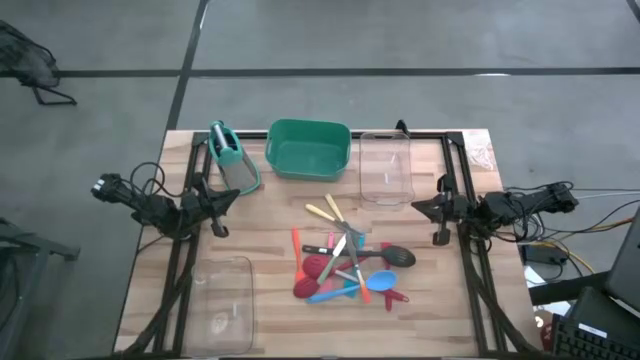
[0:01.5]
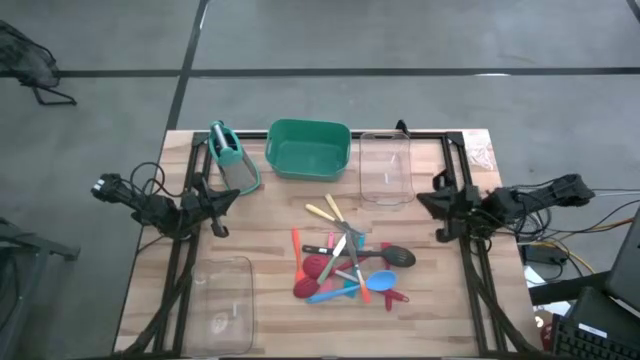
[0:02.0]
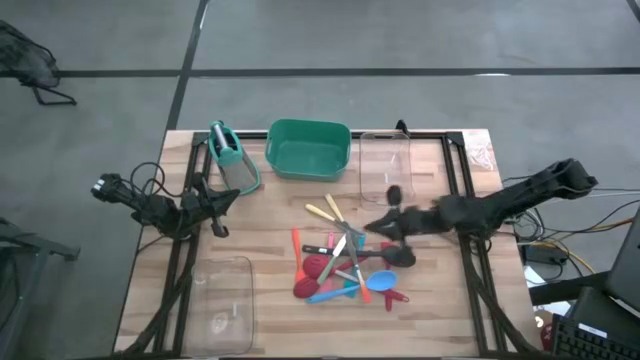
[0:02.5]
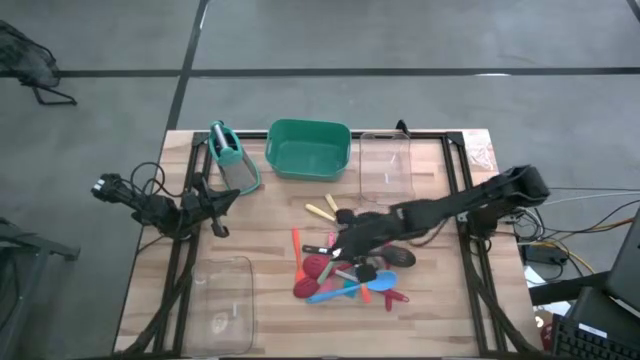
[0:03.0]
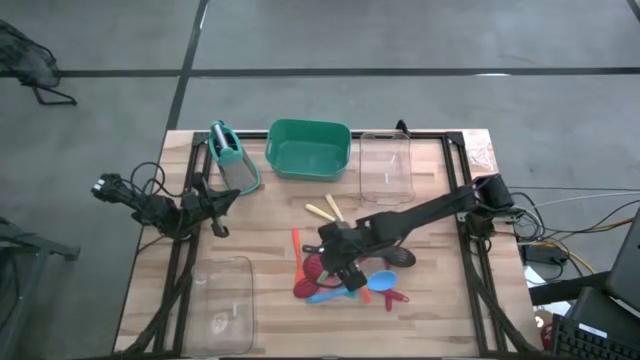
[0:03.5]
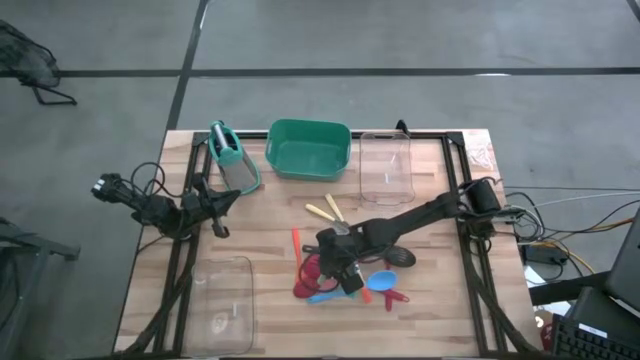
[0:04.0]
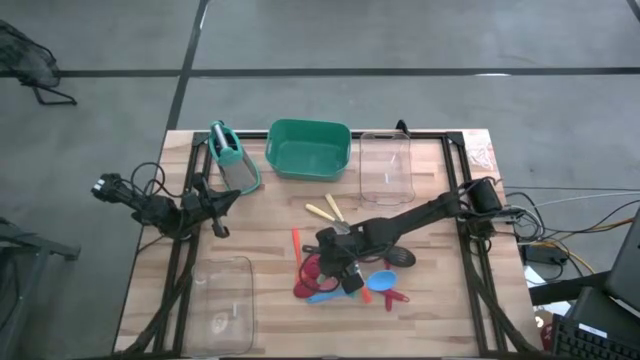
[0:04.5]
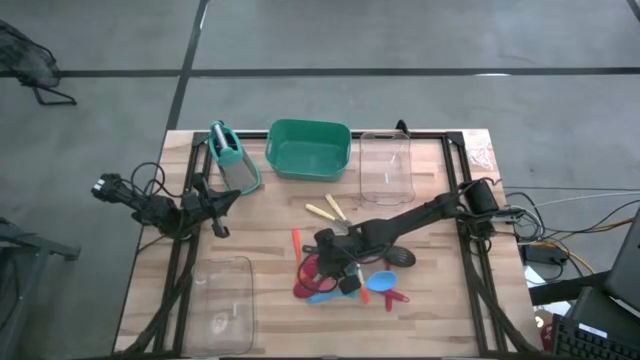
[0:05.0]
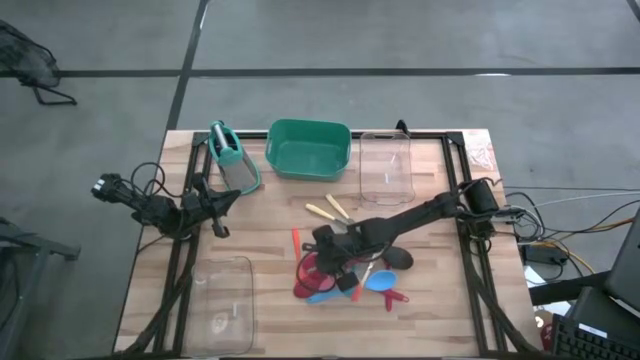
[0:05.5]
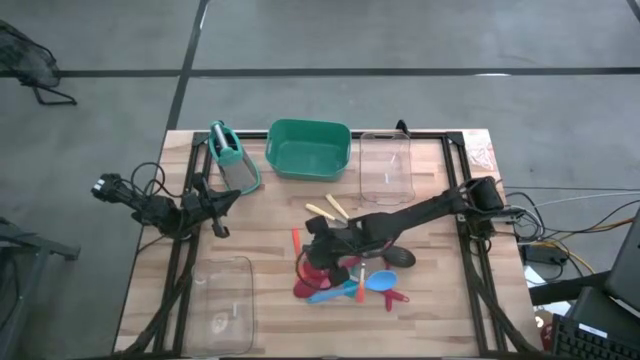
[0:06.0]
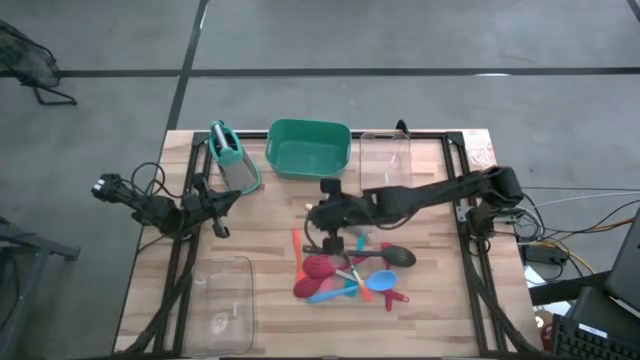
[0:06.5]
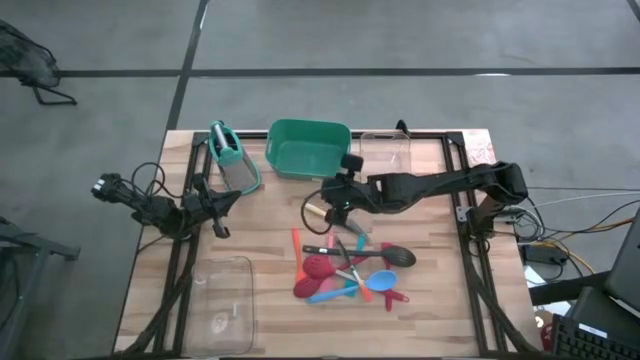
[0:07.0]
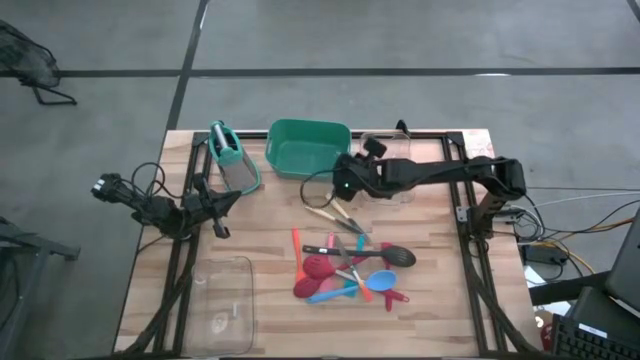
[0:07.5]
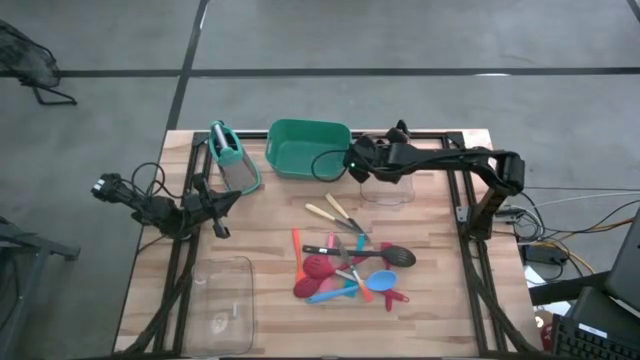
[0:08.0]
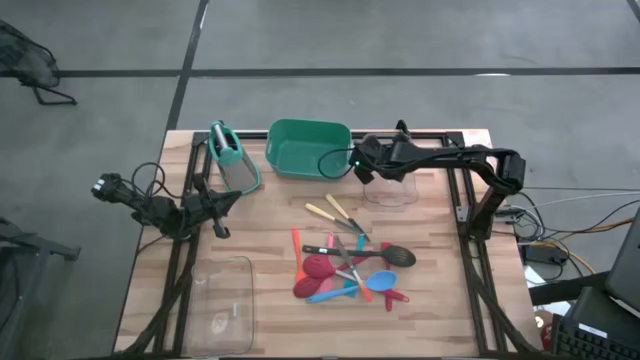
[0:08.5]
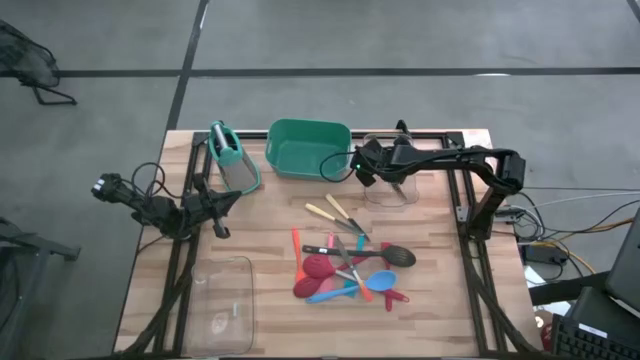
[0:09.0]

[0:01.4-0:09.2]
Task: Pick & Place Kitchen Items
Put the green knife into the top transparent bin

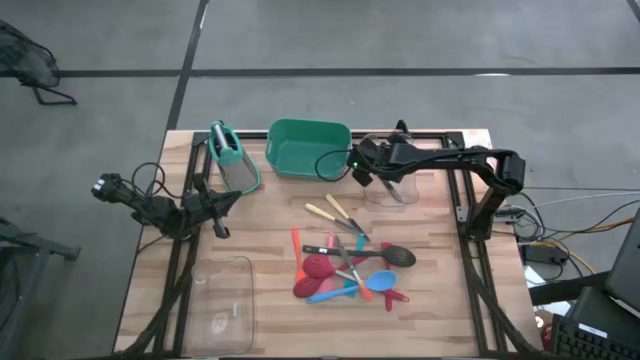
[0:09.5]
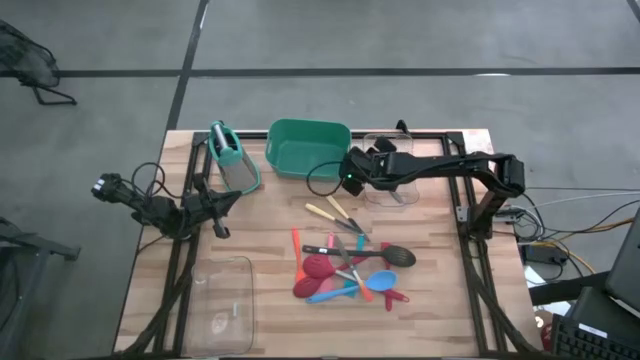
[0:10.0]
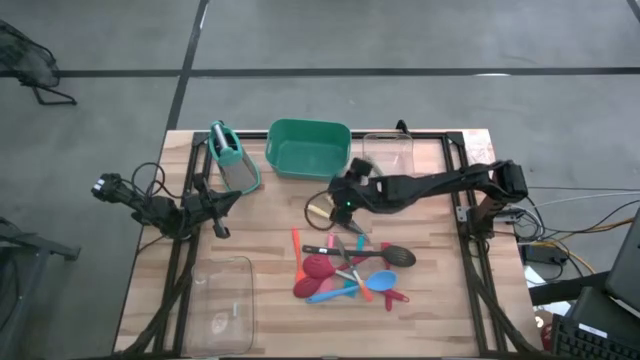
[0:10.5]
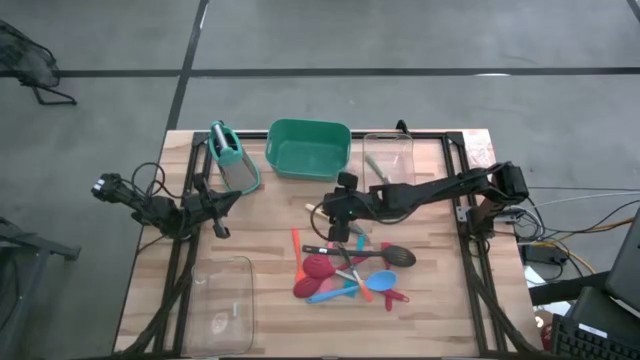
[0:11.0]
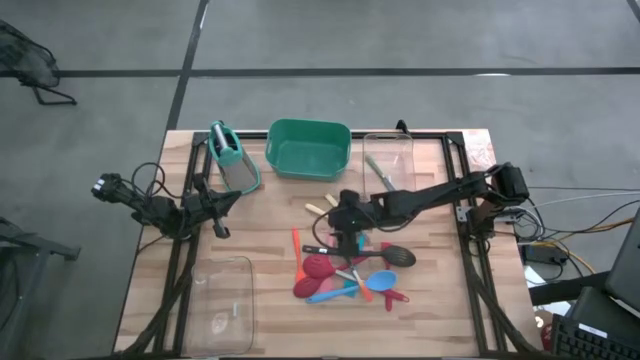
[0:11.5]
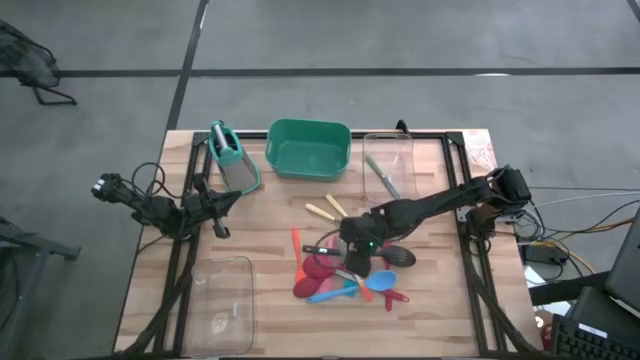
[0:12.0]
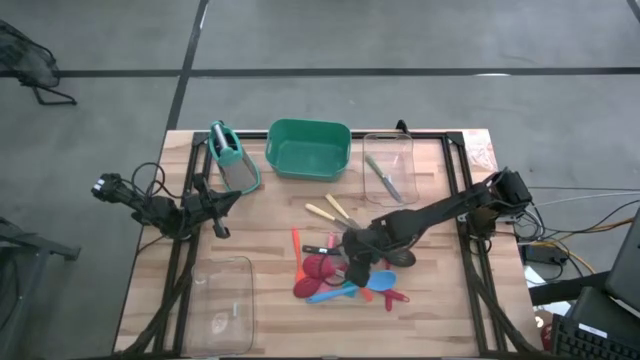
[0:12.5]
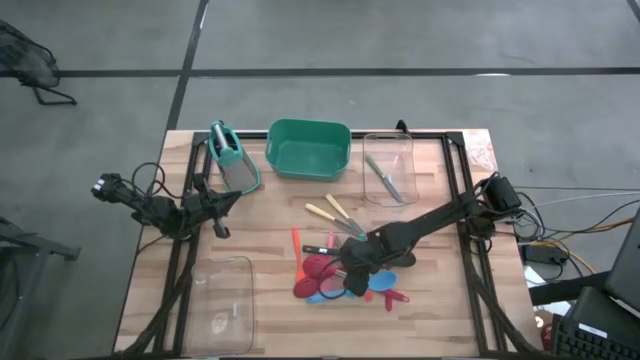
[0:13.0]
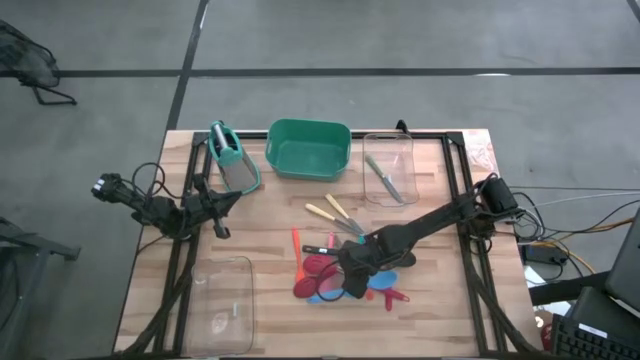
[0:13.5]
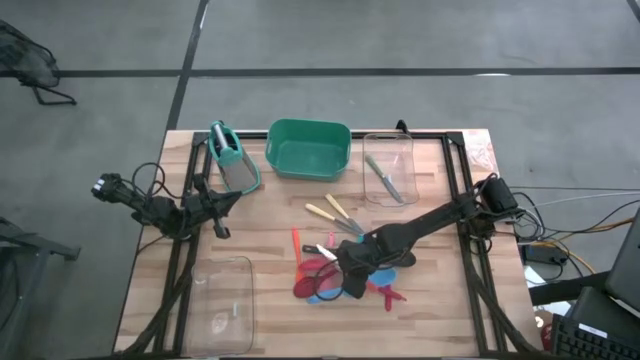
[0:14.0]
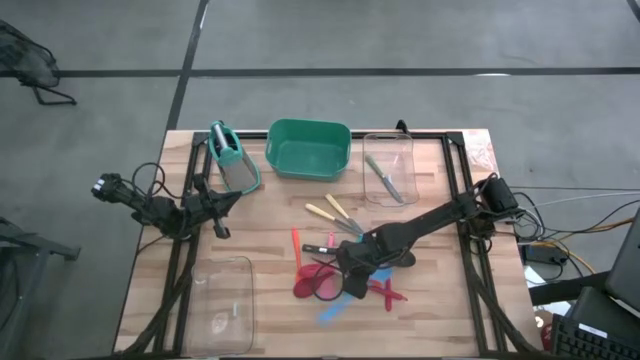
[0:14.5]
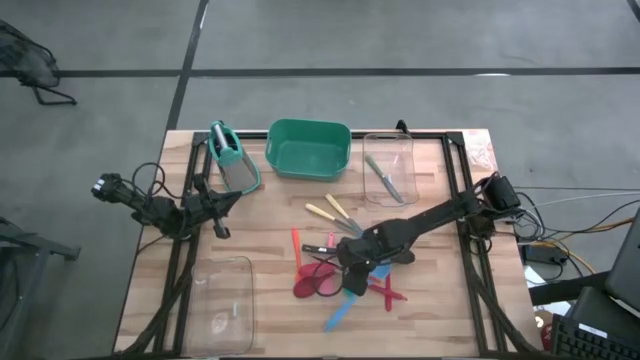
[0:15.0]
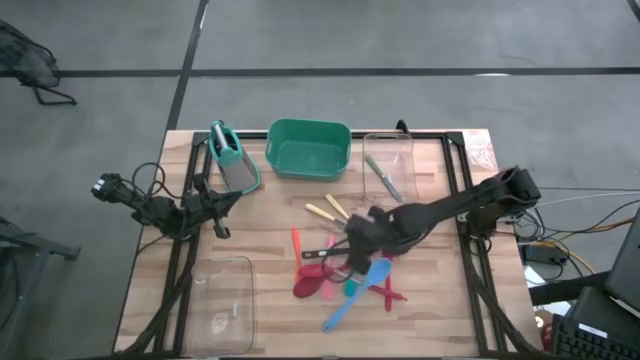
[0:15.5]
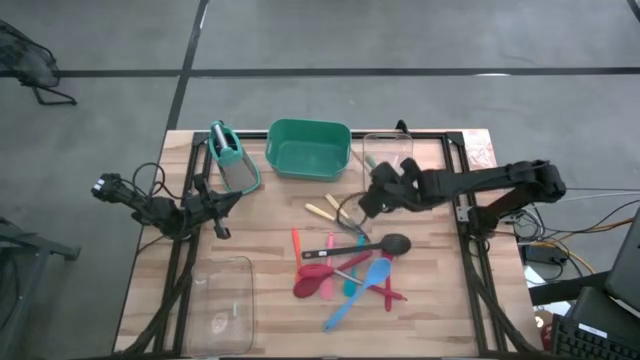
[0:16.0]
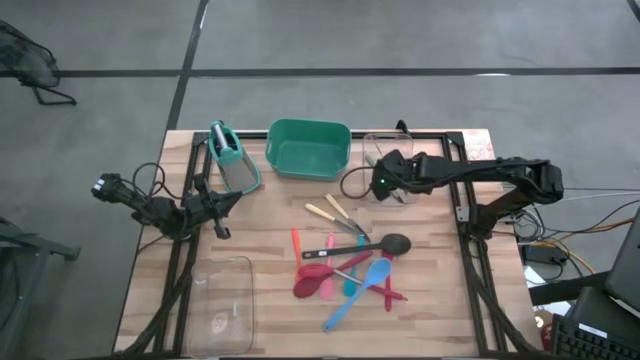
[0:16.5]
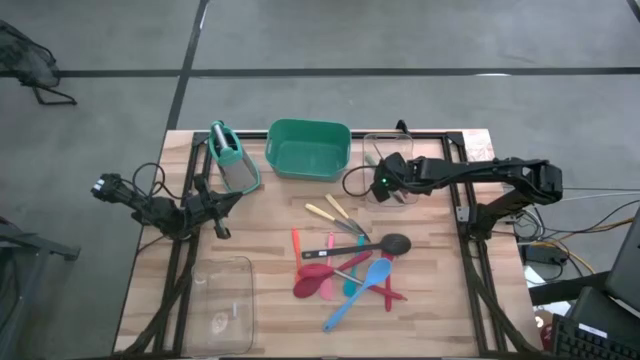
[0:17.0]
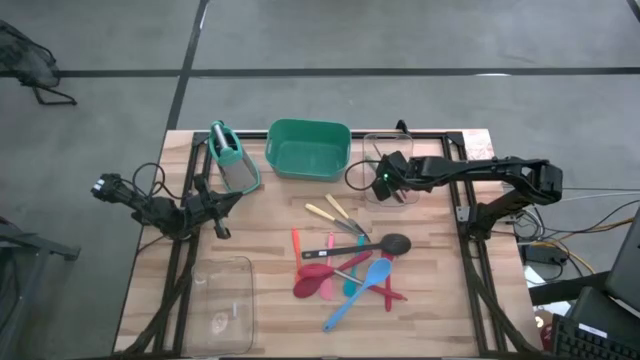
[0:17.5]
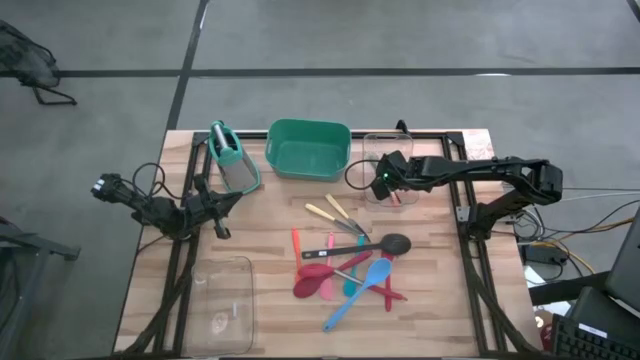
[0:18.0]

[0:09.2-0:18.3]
Put the white orange knife into the top transparent bin

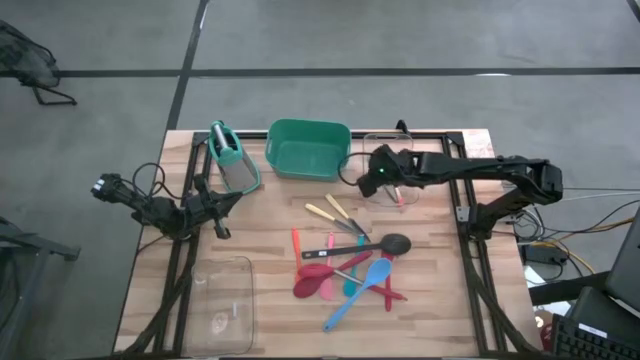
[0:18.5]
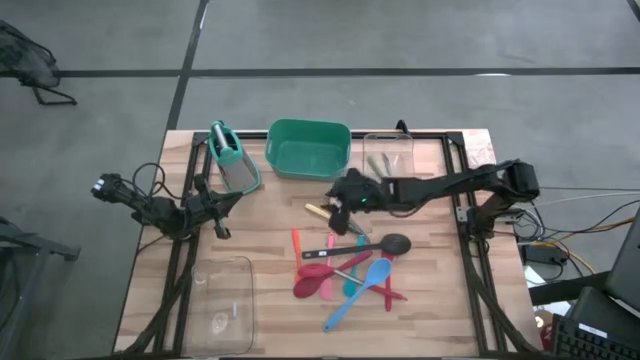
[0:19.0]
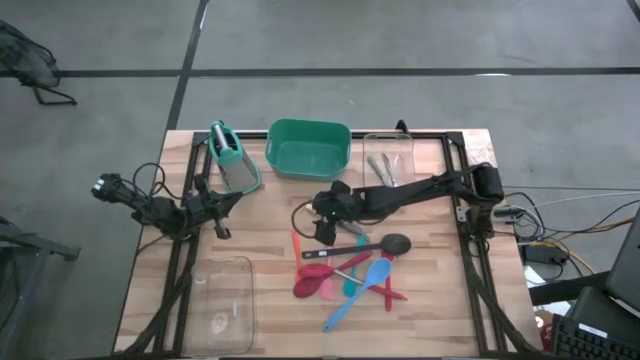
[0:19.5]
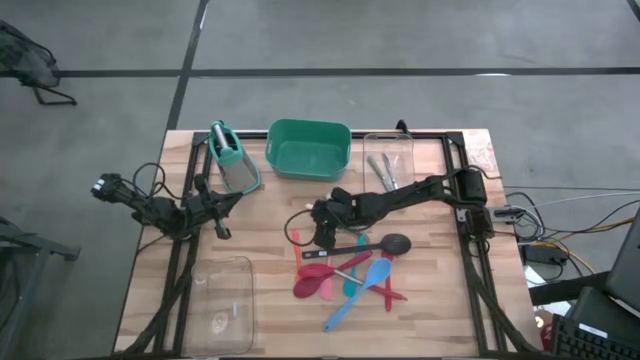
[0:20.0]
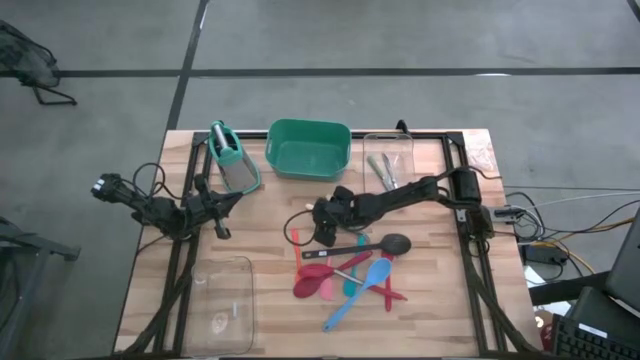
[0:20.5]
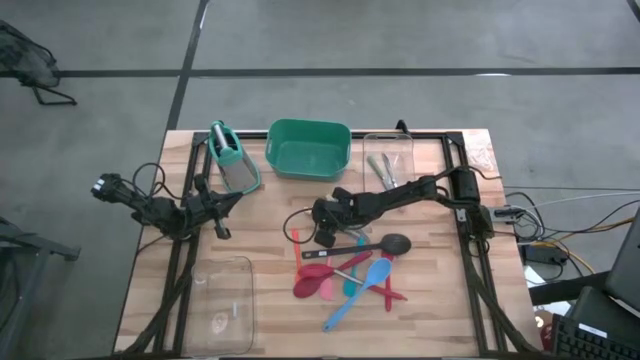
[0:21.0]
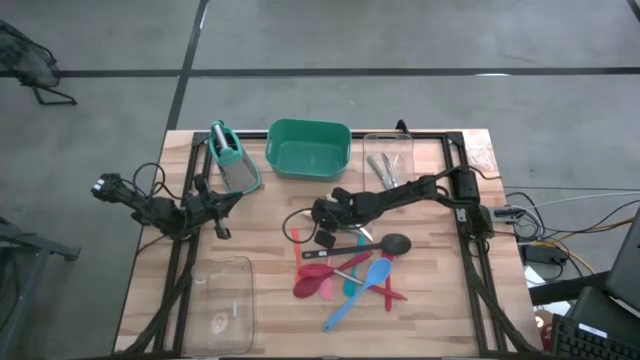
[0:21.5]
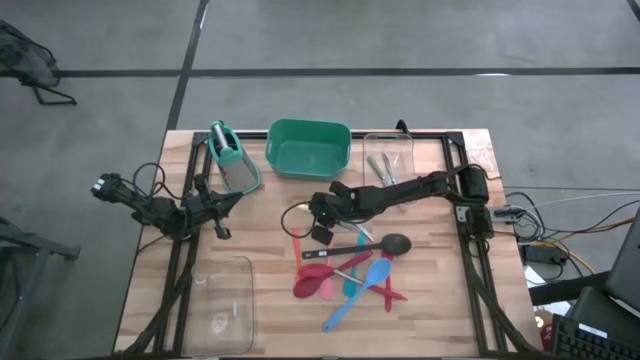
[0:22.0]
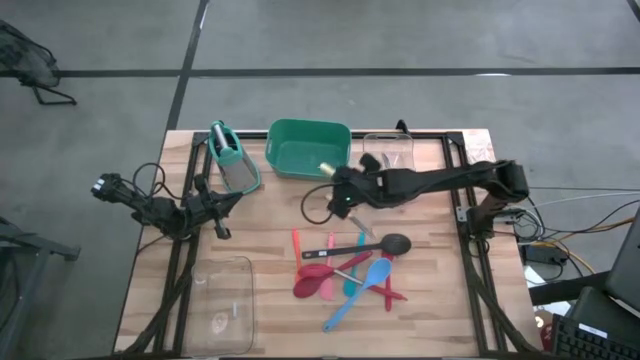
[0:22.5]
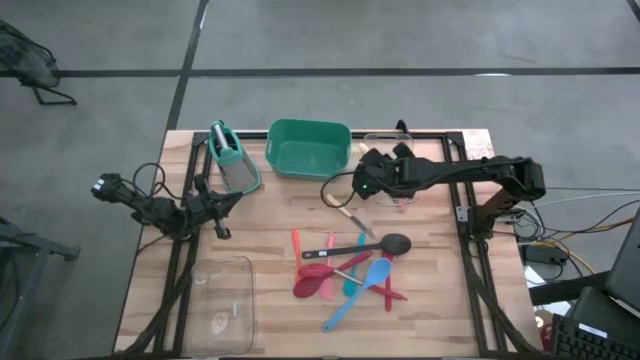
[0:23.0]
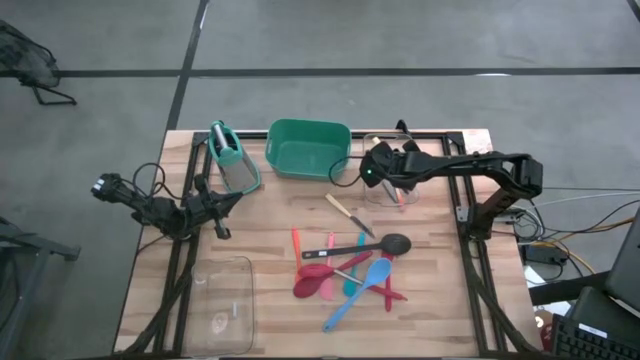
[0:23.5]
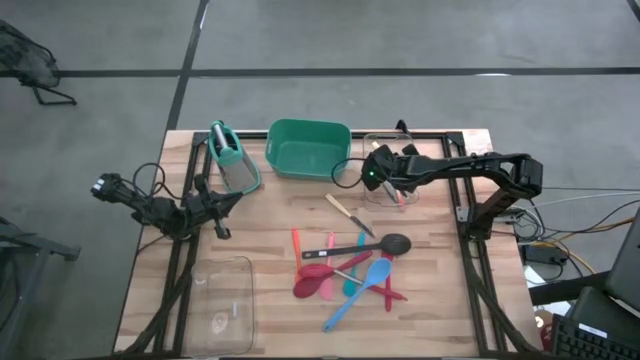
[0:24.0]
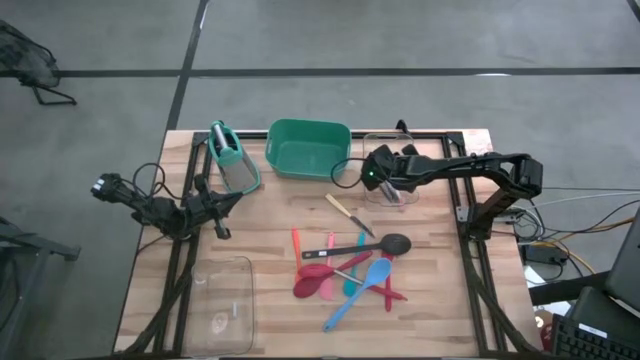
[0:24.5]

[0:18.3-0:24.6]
Put the left yellow knife into the top transparent bin
